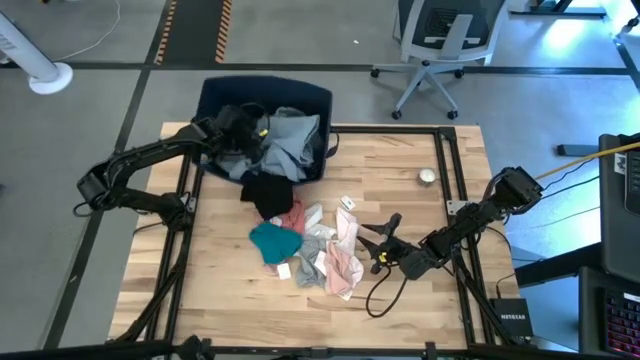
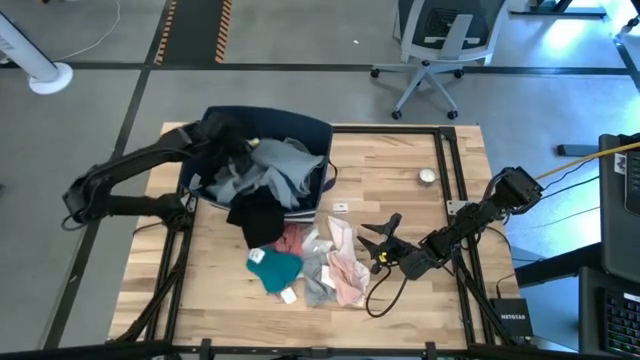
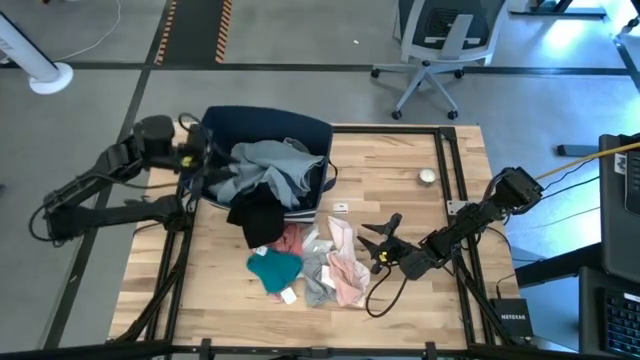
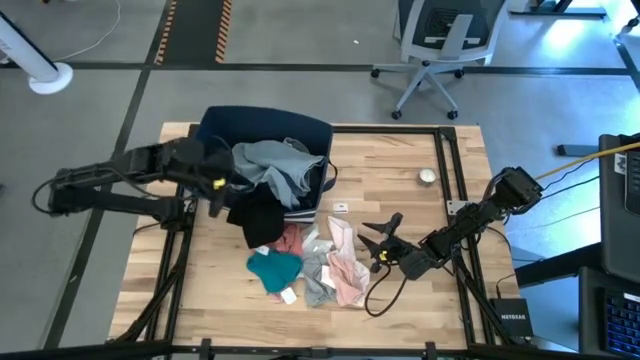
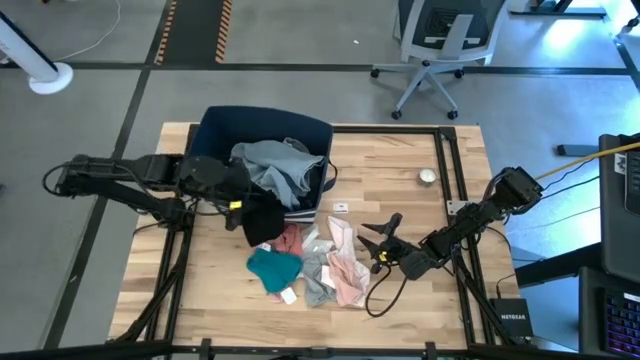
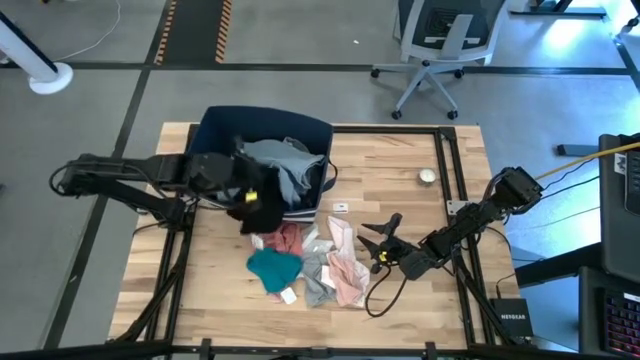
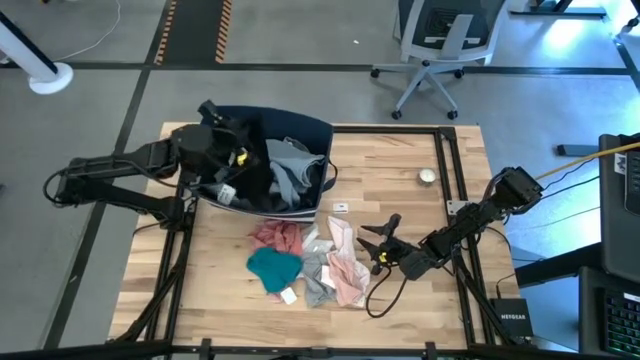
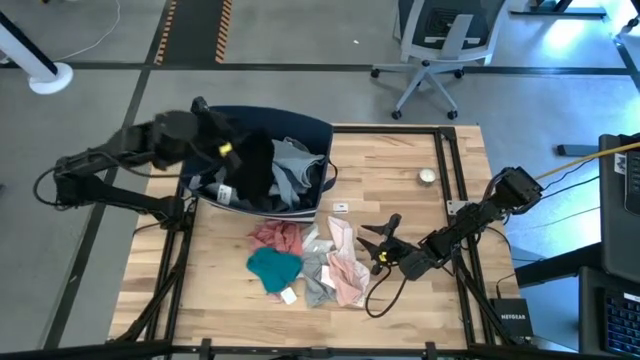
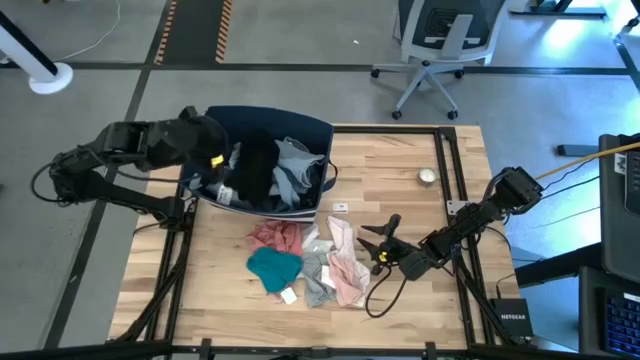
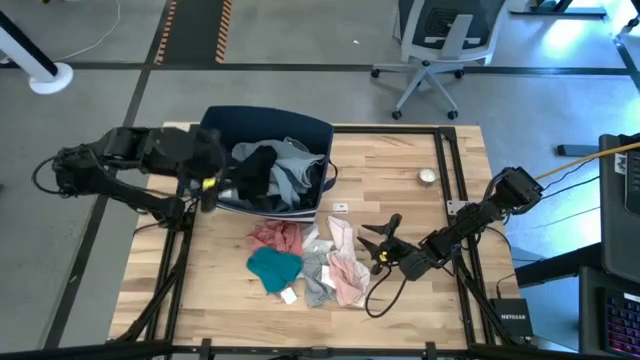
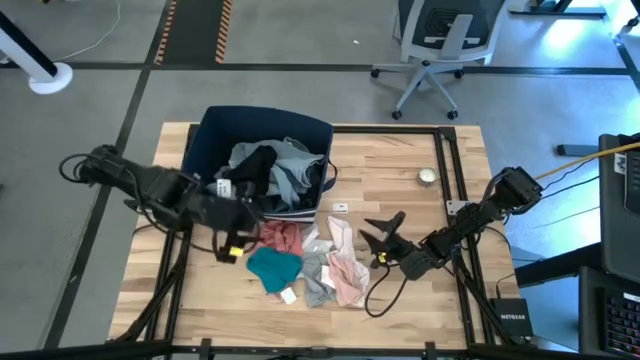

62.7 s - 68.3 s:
Task: Sort clothes
Adjust the blue laundry organizer

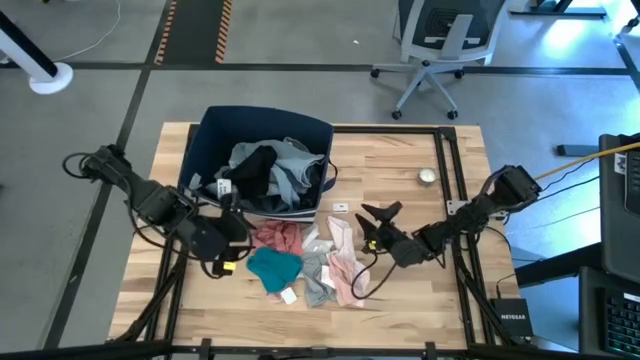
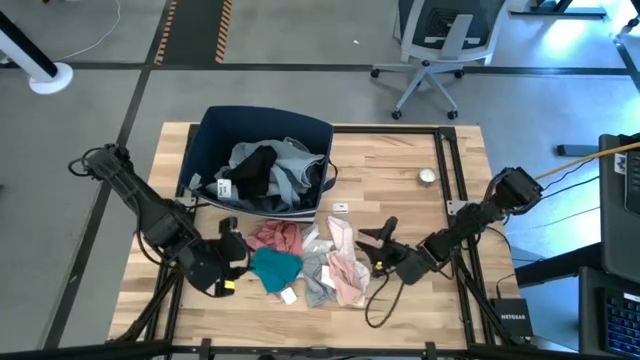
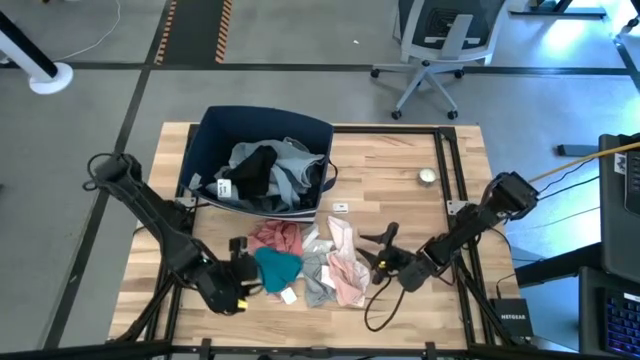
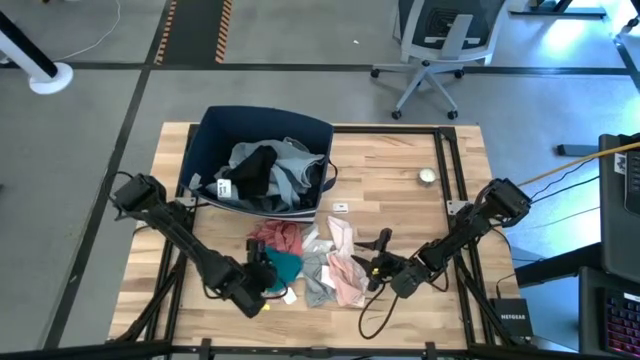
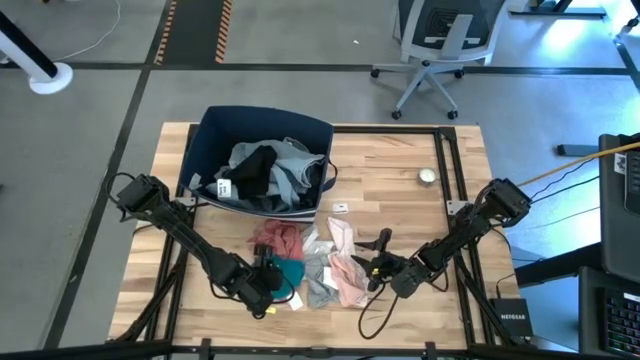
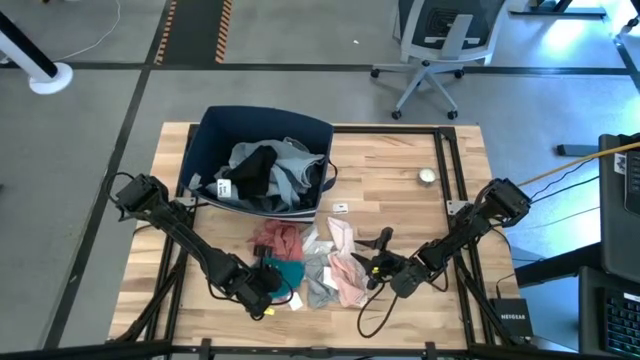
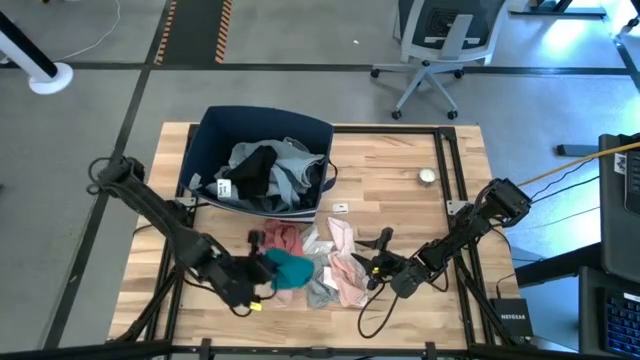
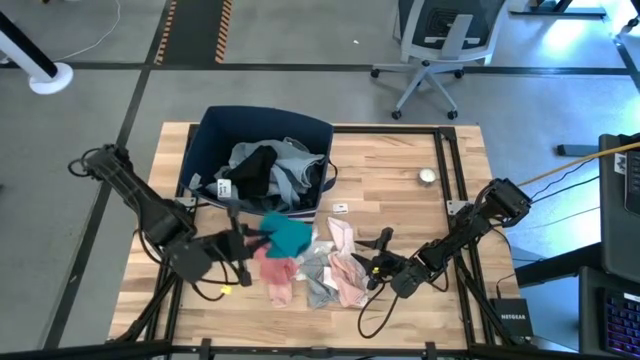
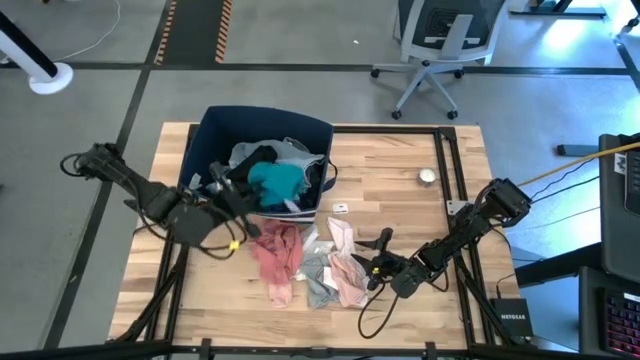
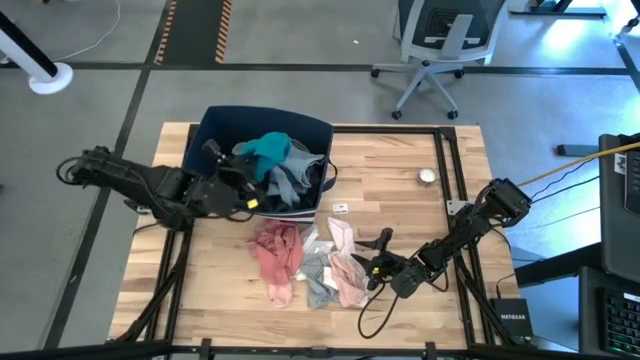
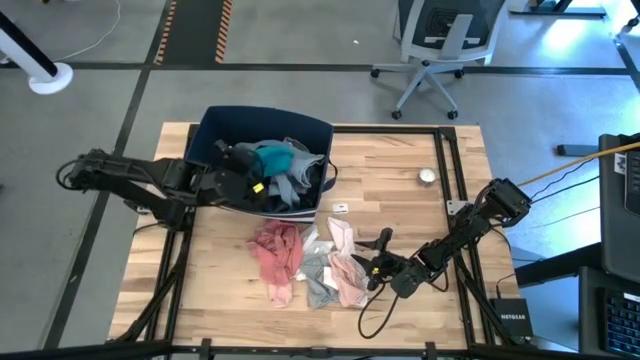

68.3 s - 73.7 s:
Put the blue socks into the blue laundry organizer

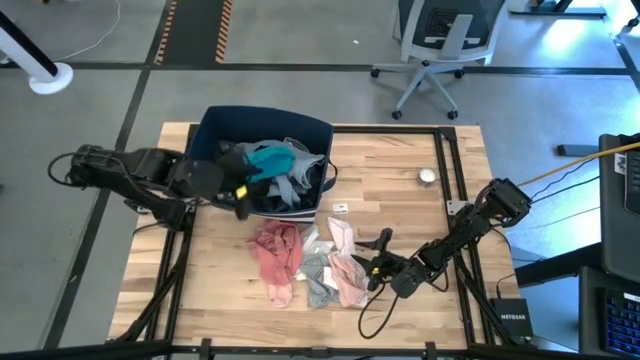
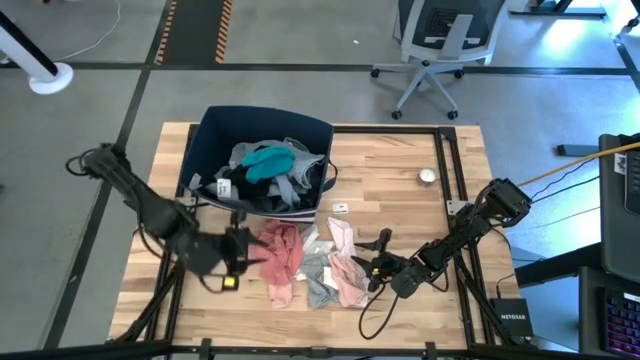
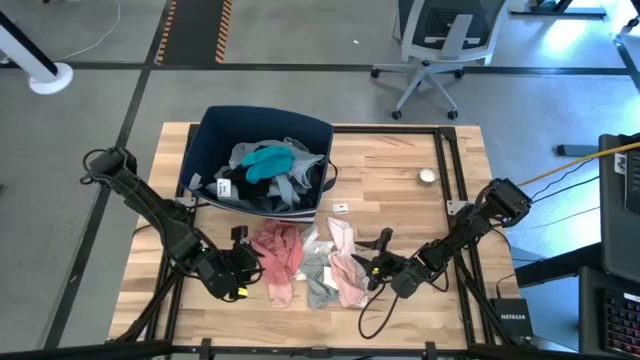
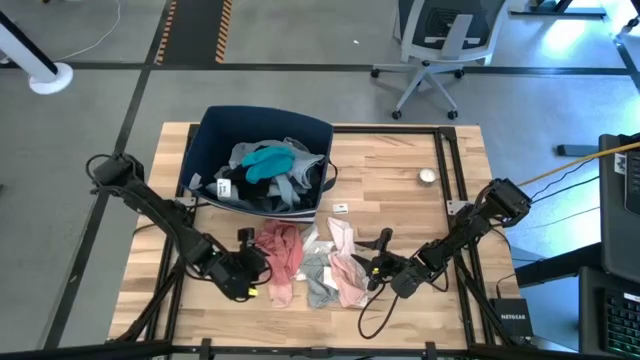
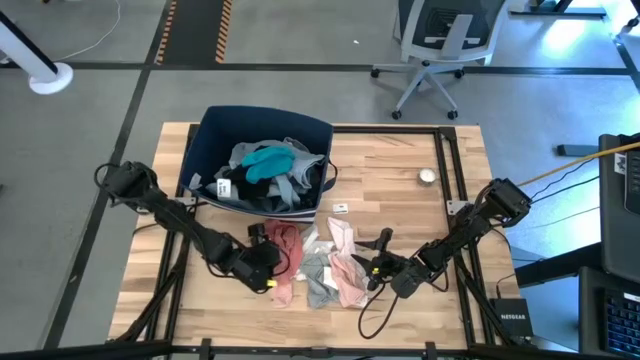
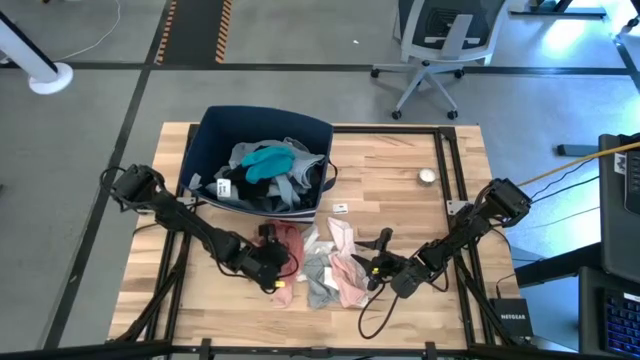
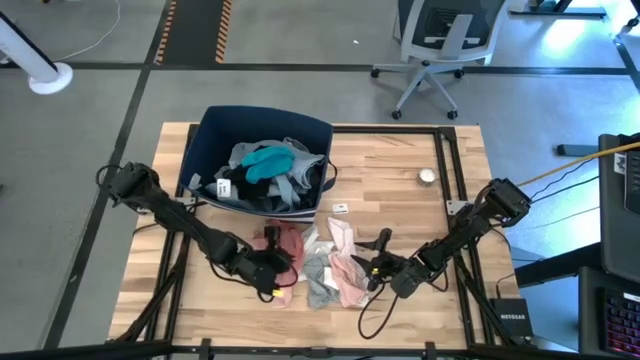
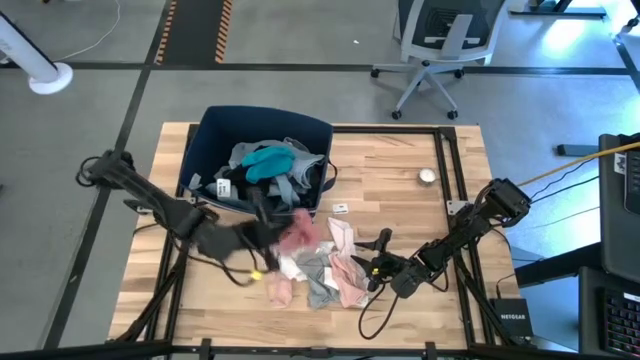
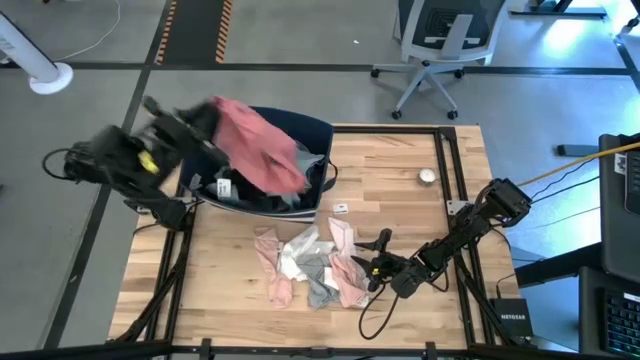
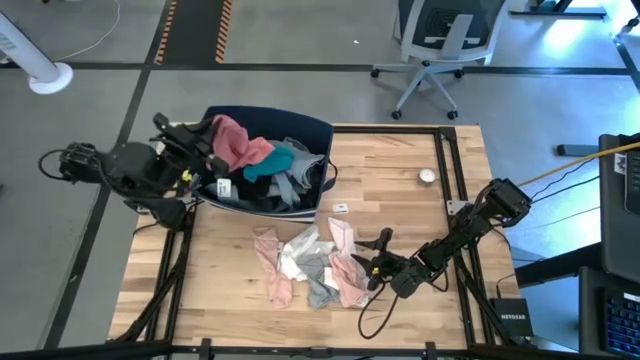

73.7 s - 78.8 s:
Put the pink shirt into the blue laundry organizer

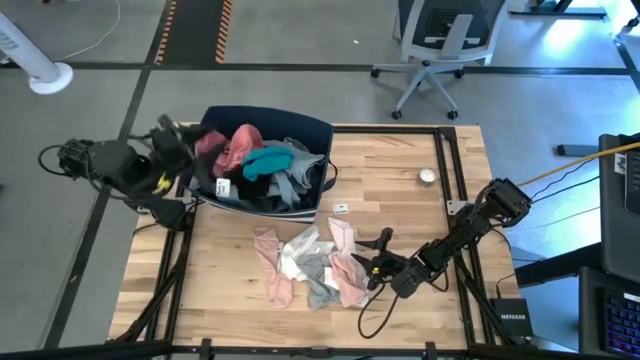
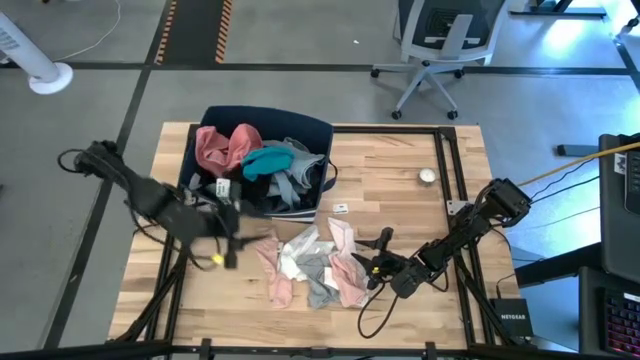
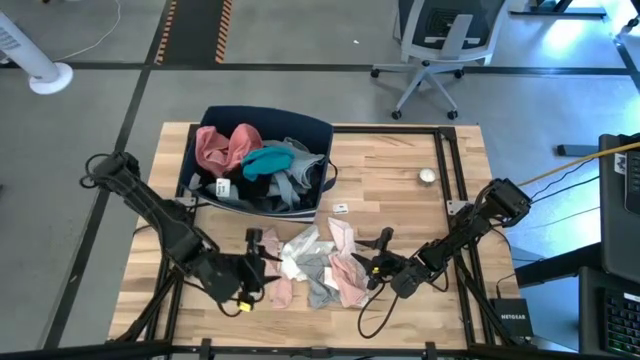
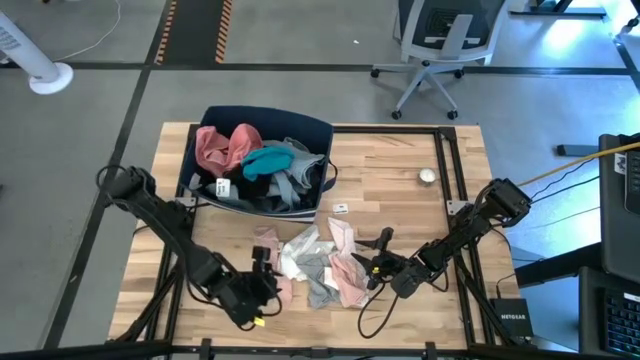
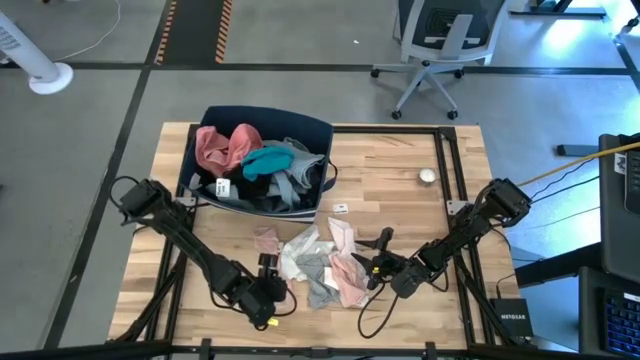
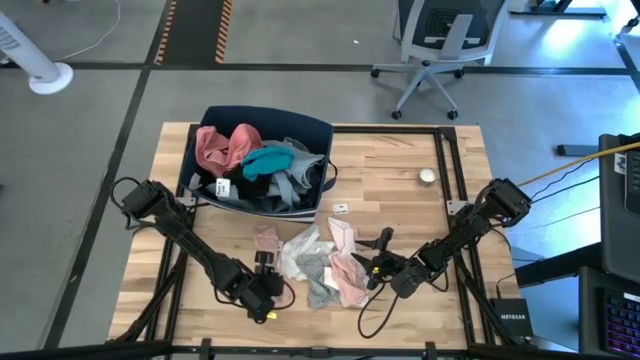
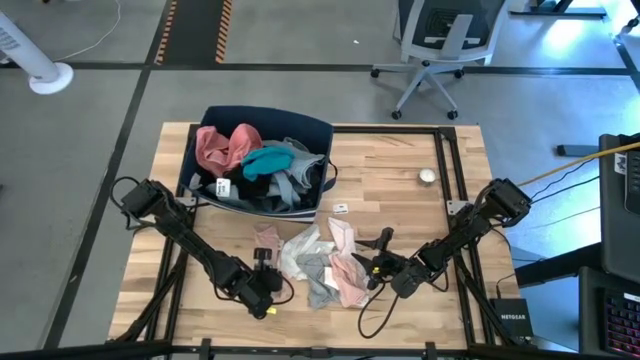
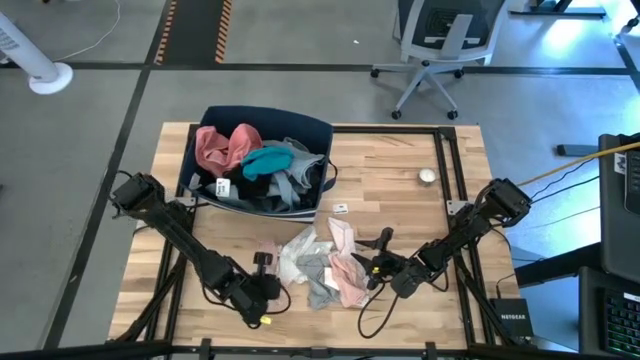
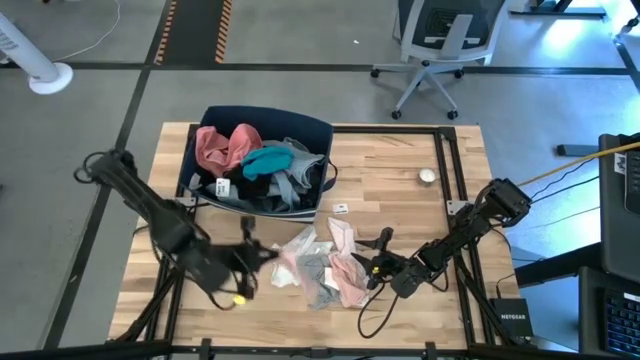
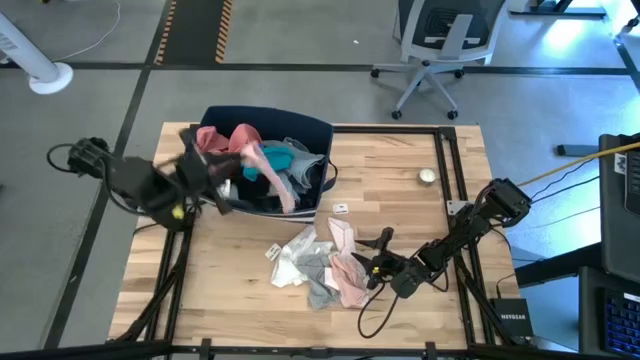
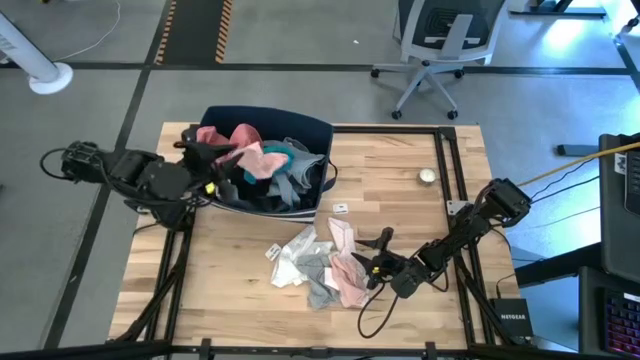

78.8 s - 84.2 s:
Put the left pink sock into the blue laundry organizer
